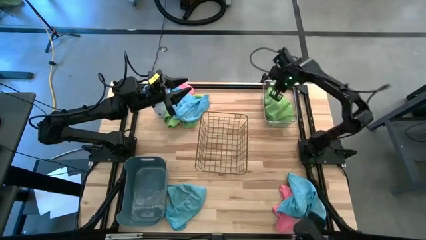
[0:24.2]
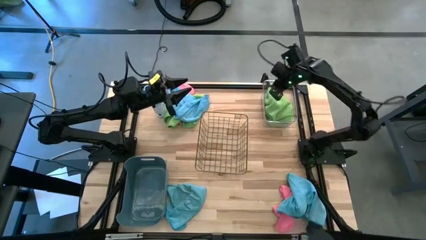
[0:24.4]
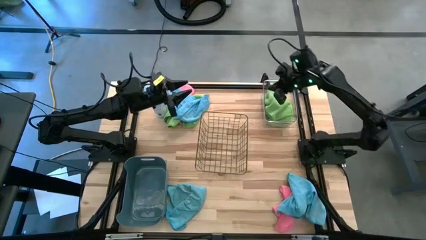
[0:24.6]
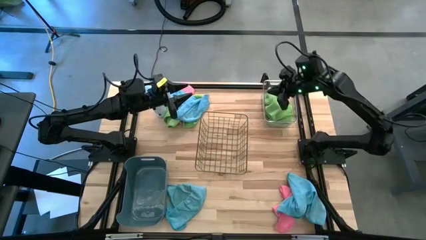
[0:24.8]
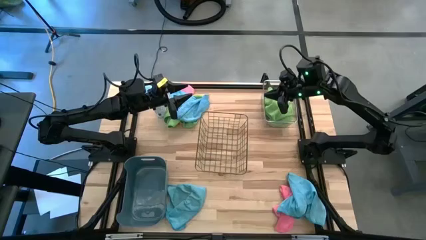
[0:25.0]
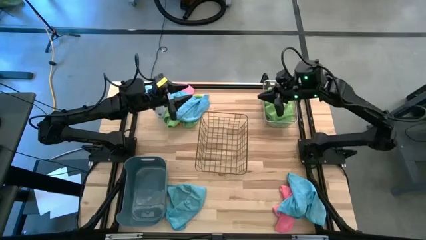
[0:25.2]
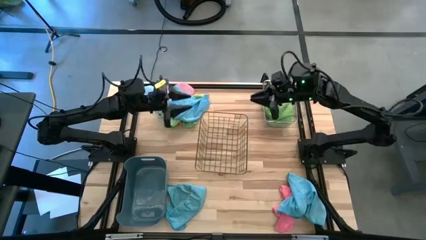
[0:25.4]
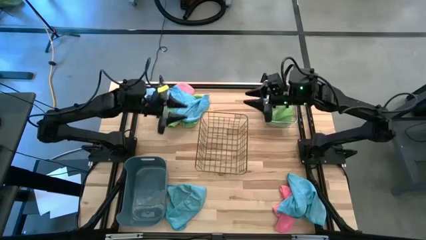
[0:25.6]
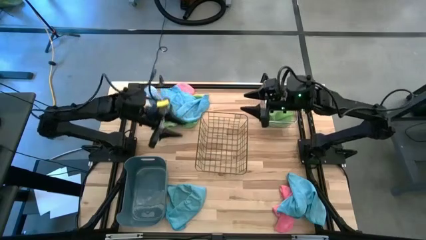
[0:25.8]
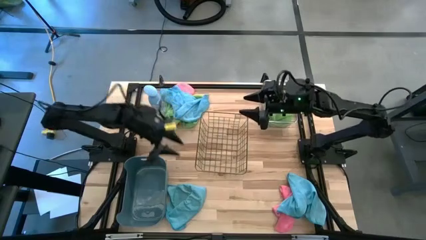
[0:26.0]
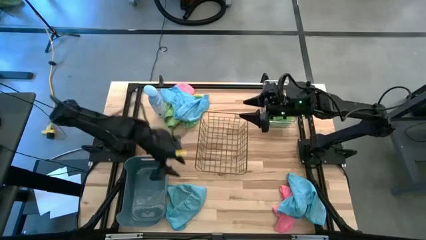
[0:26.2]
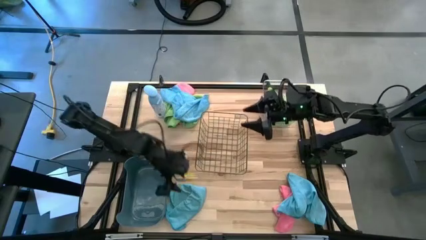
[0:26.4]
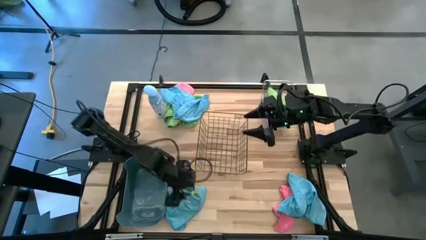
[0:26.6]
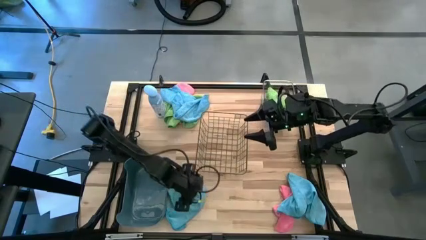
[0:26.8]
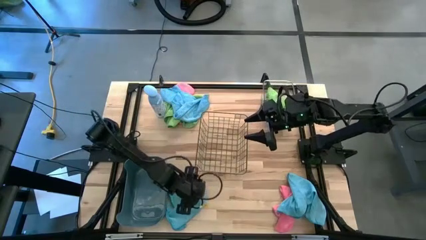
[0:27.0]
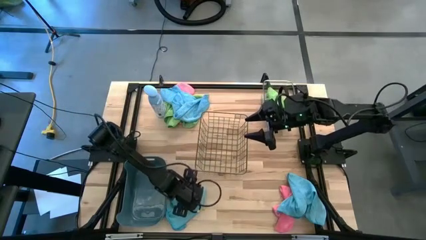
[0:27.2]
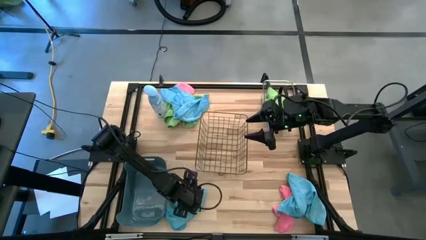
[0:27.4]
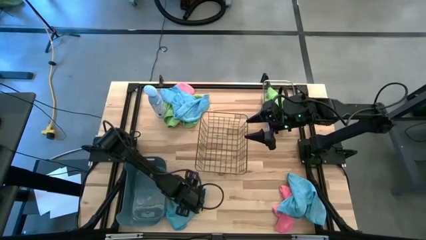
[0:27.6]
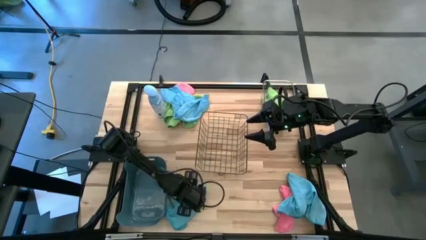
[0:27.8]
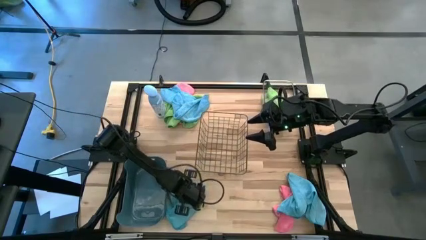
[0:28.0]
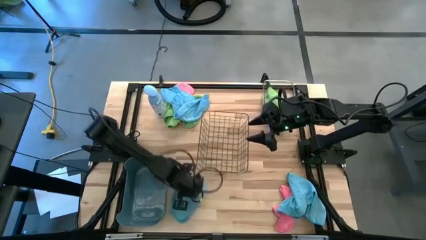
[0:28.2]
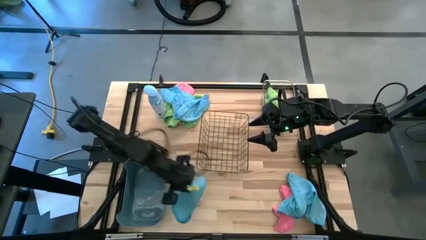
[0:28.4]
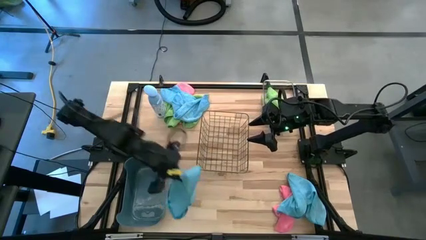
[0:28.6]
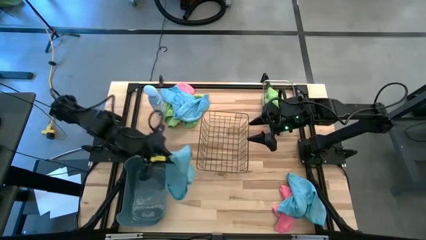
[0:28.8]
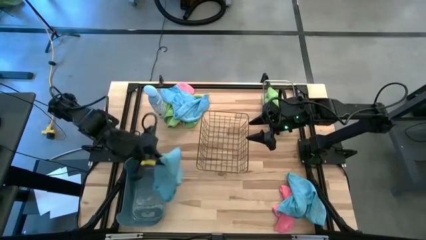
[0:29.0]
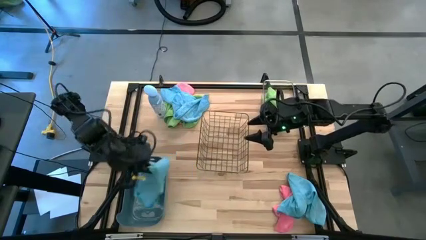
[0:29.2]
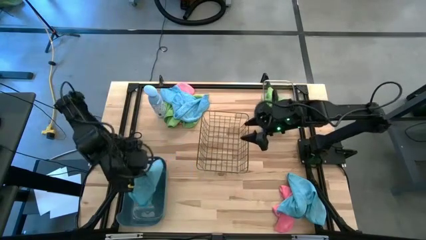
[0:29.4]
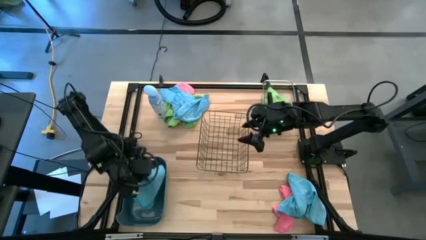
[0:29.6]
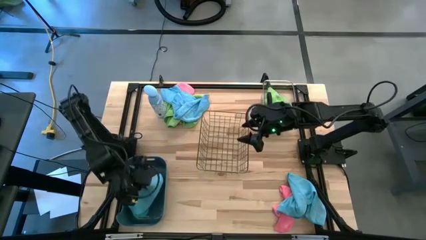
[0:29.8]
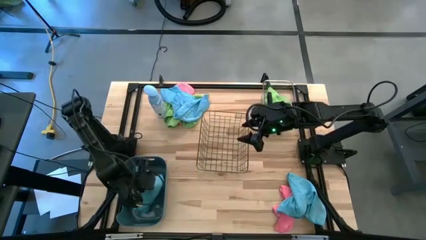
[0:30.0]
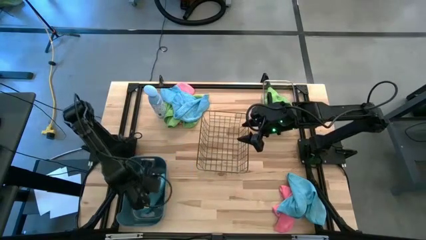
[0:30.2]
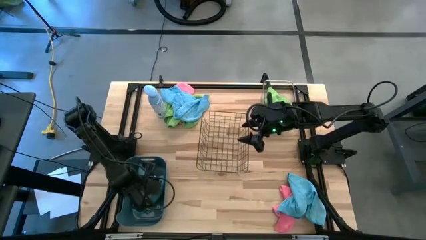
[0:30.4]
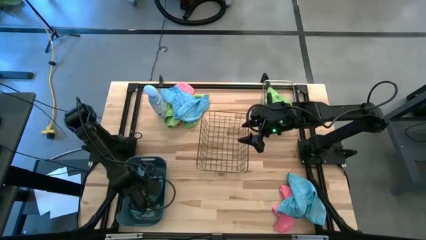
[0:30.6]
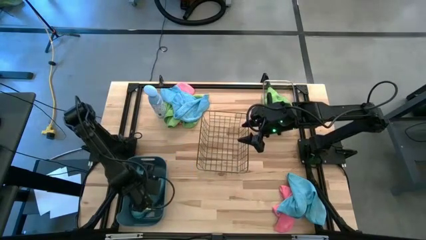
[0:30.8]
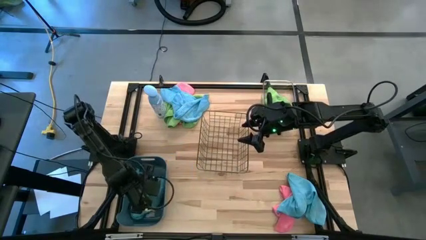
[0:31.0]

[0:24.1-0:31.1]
Task: Sort microfiber towel by color & place in baskets
Put the bottom left blue microfiber cloth into the blue bin

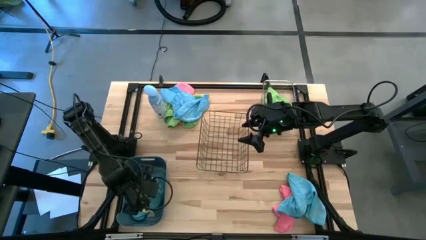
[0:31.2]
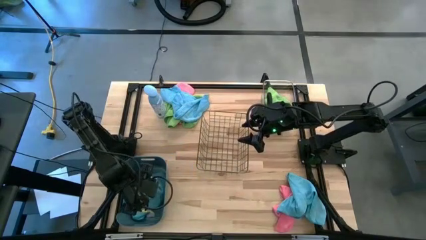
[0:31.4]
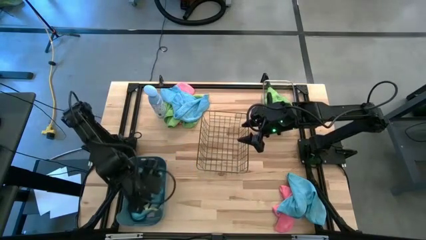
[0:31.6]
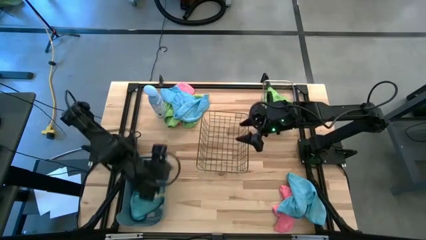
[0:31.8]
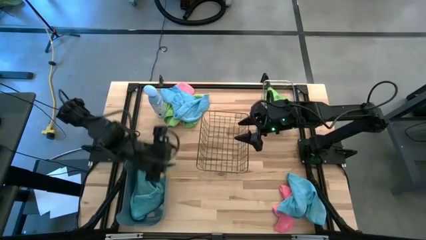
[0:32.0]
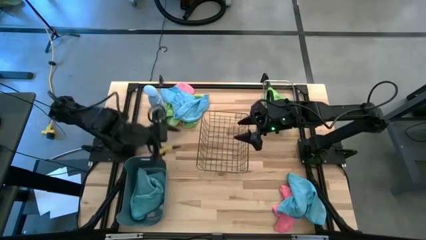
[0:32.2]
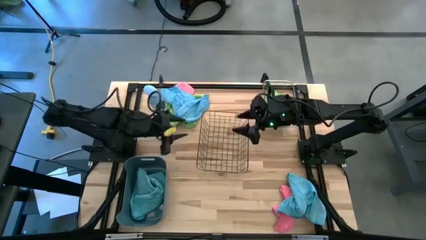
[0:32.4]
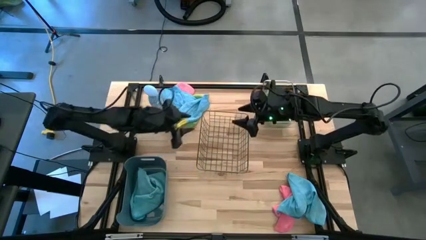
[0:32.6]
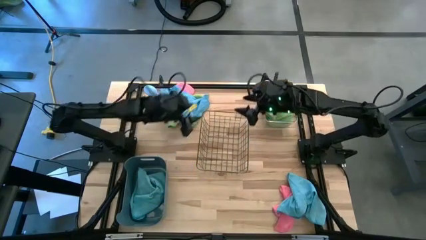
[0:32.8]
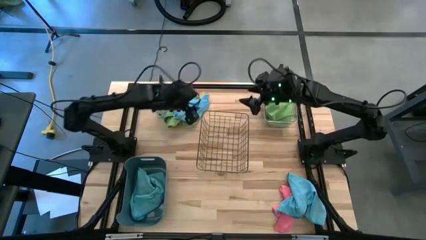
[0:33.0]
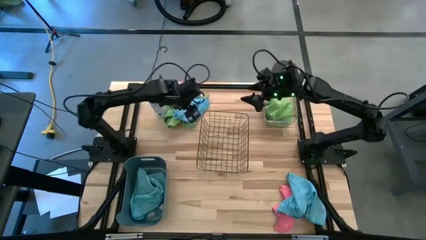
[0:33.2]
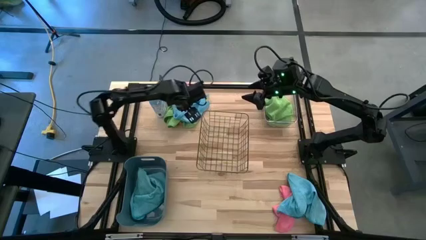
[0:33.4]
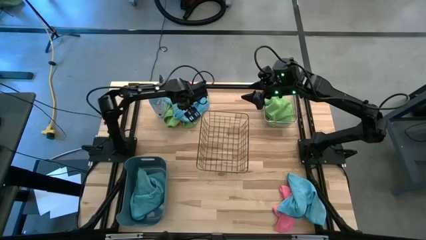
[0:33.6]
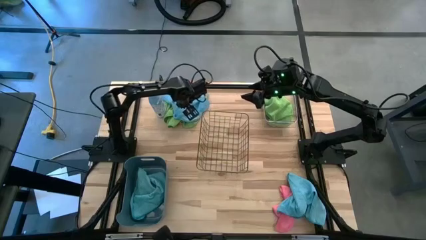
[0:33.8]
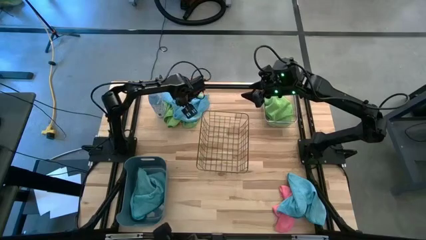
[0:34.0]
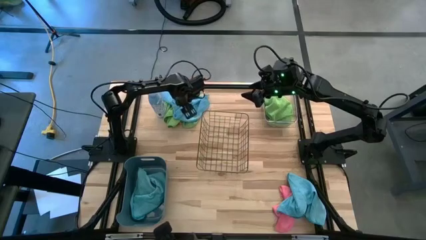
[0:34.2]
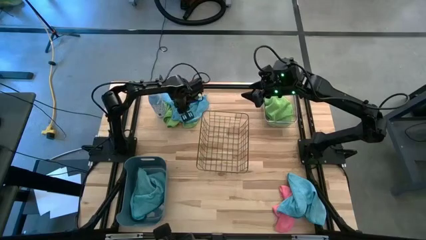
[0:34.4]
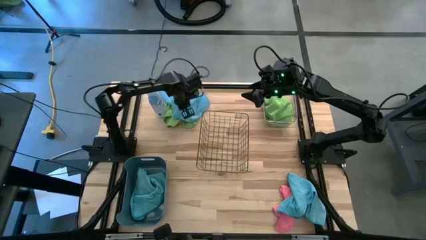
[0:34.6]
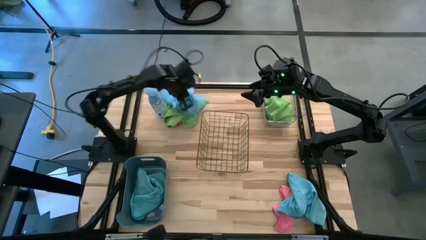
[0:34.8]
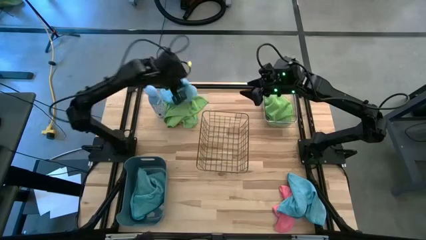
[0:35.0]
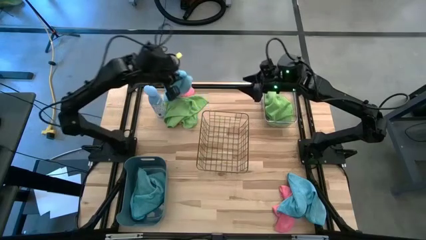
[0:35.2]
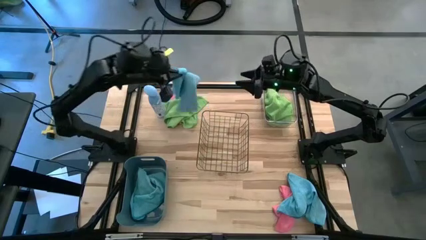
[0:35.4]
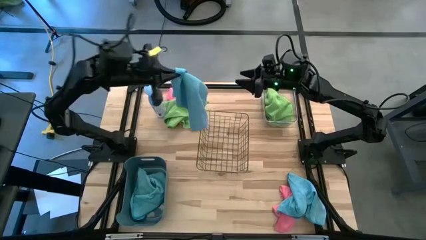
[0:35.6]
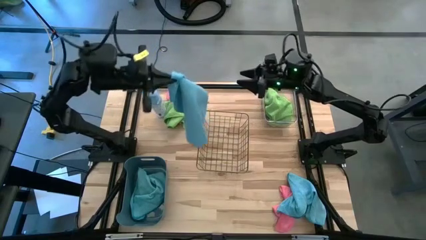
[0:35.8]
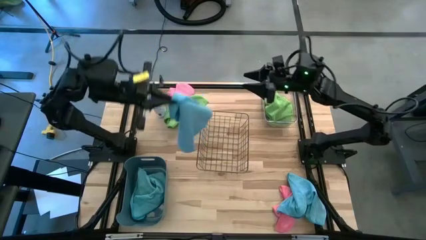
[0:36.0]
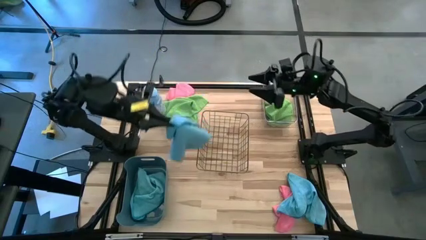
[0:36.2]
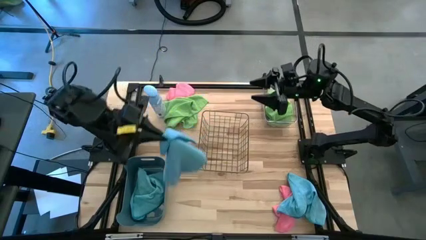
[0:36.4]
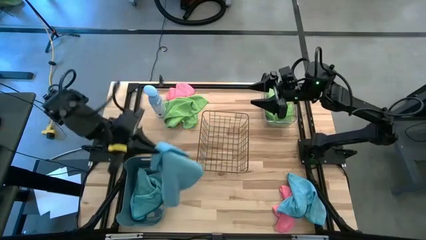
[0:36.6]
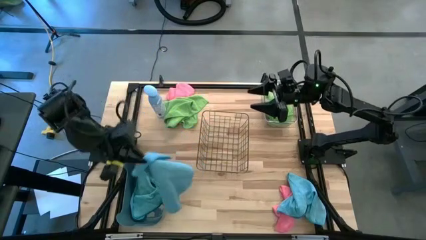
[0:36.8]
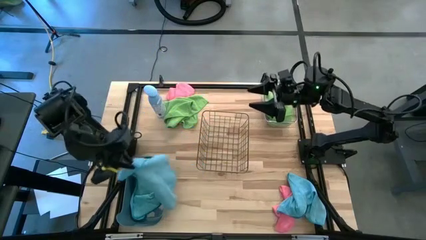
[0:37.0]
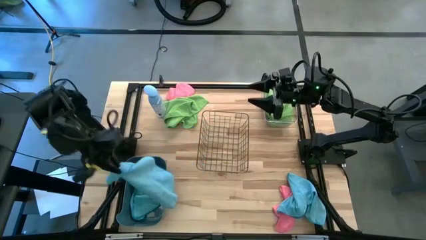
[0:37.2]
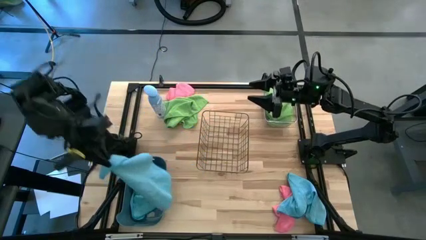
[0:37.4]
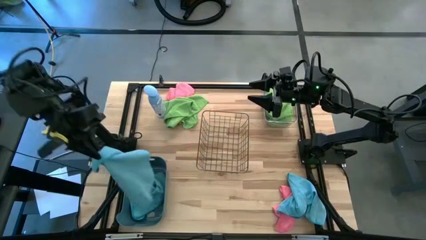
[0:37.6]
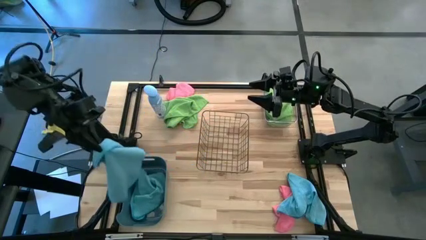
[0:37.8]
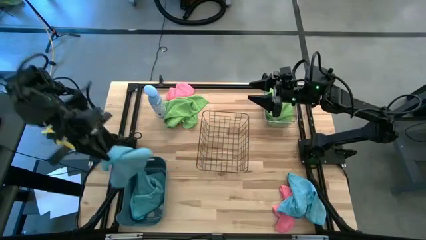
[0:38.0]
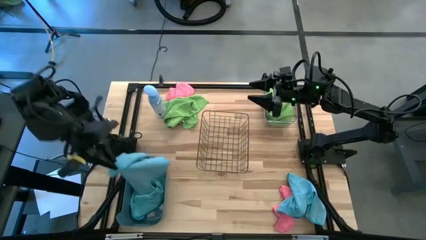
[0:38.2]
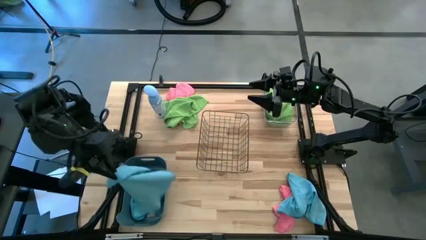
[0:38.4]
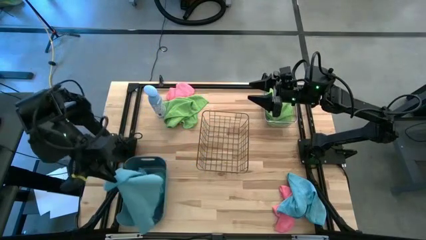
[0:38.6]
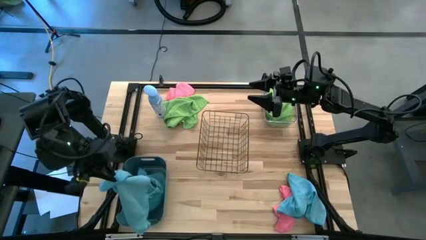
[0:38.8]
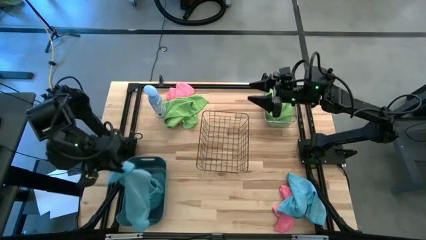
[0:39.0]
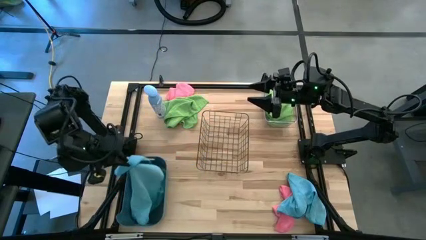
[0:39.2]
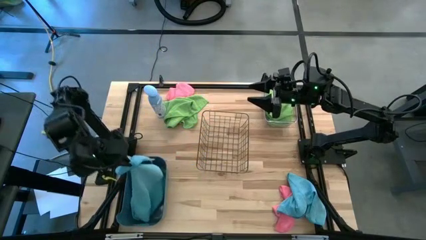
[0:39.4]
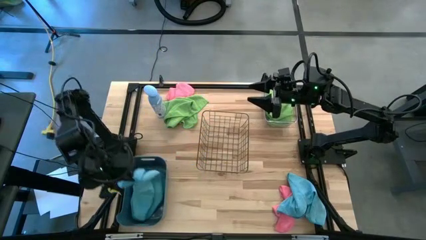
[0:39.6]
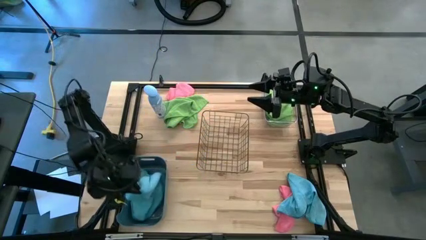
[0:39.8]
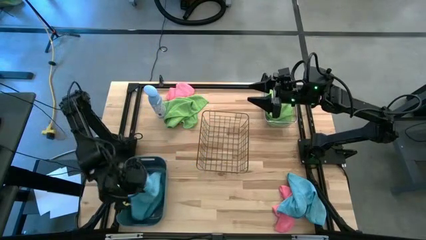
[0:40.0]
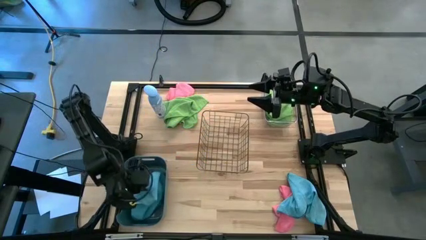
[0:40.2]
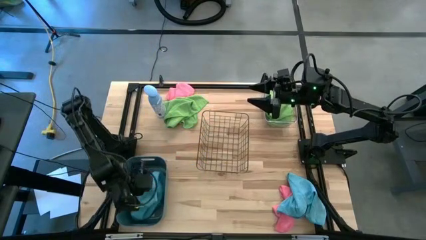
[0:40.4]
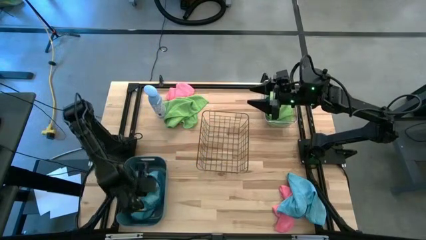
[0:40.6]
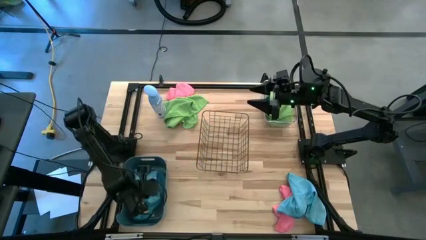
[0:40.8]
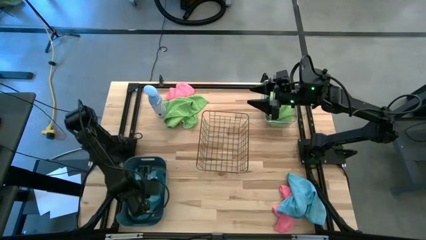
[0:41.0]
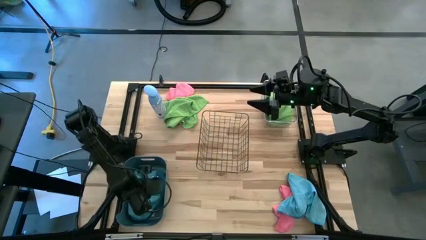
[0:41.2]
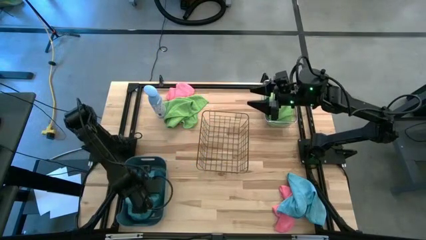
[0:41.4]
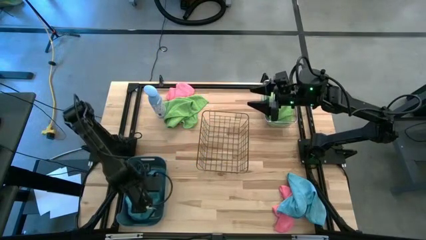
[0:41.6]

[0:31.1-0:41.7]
Put the top blue microfiber cloth into the blue bin
